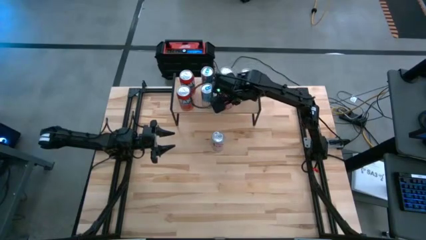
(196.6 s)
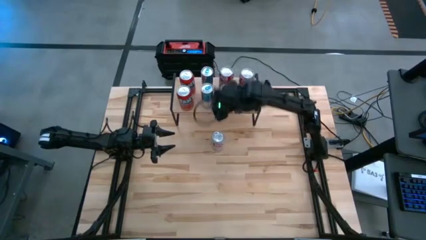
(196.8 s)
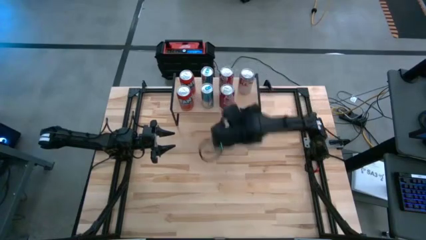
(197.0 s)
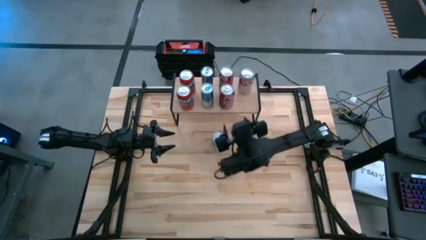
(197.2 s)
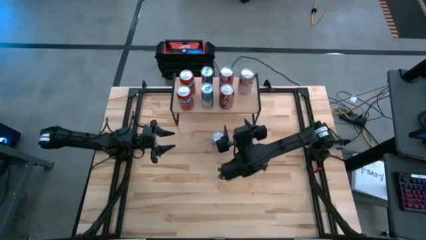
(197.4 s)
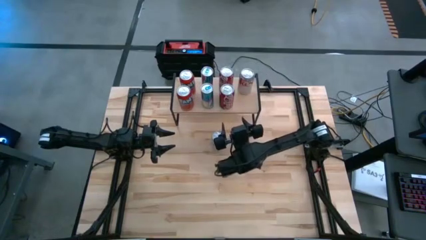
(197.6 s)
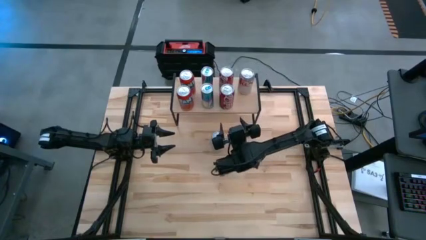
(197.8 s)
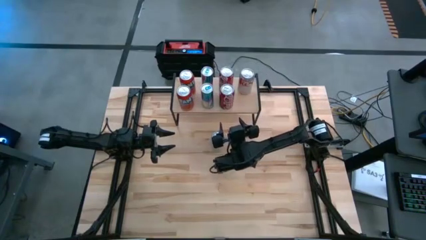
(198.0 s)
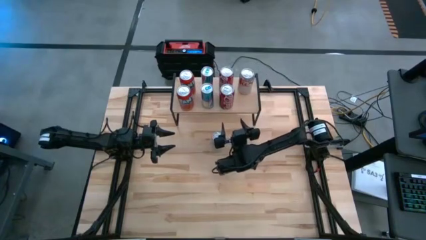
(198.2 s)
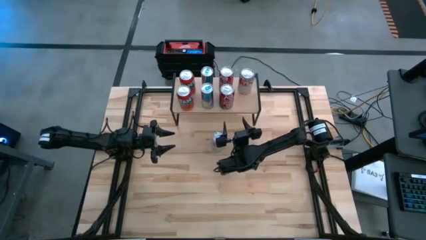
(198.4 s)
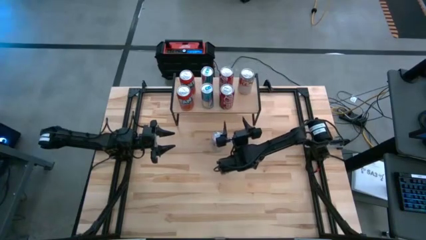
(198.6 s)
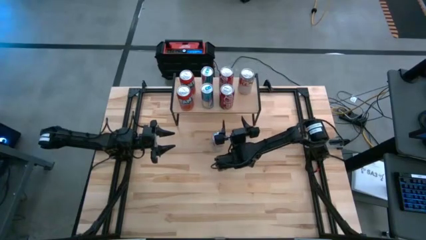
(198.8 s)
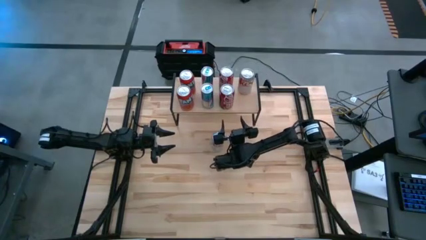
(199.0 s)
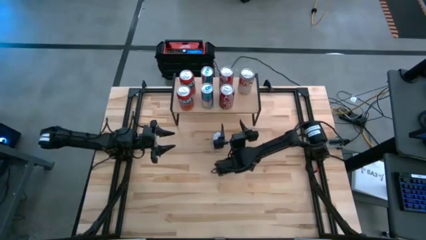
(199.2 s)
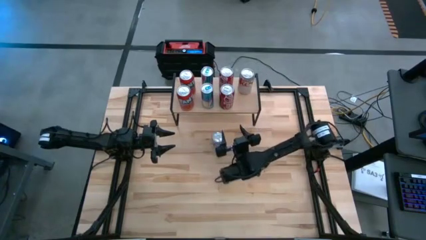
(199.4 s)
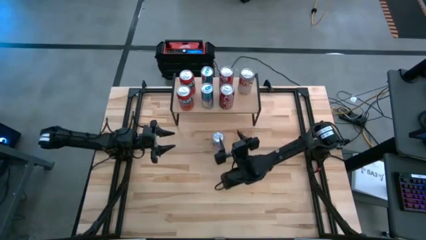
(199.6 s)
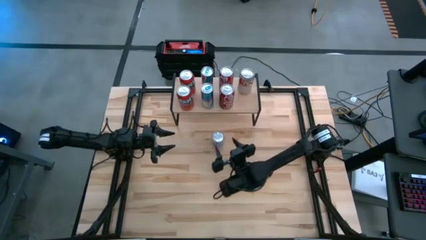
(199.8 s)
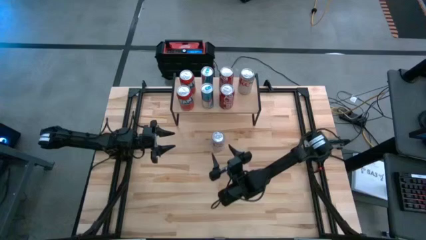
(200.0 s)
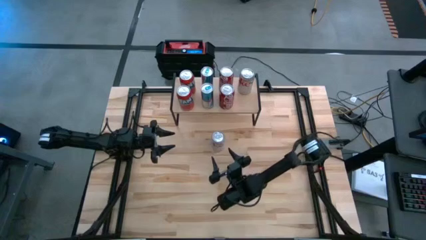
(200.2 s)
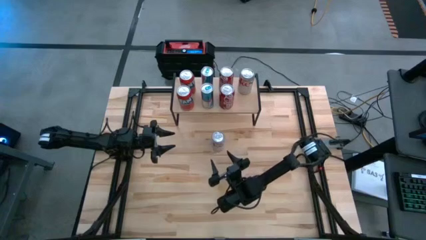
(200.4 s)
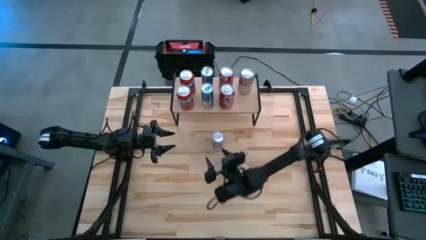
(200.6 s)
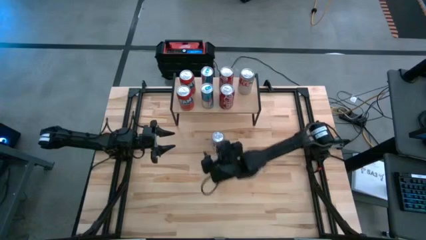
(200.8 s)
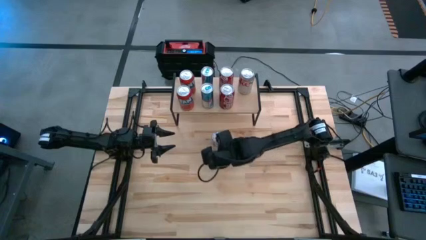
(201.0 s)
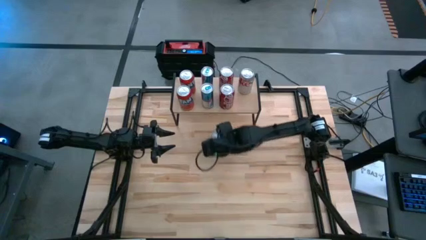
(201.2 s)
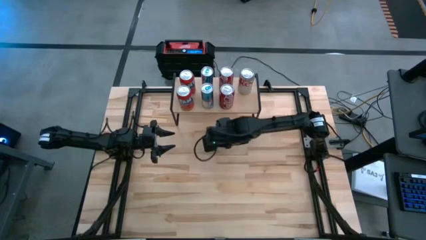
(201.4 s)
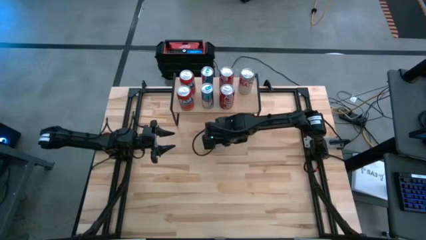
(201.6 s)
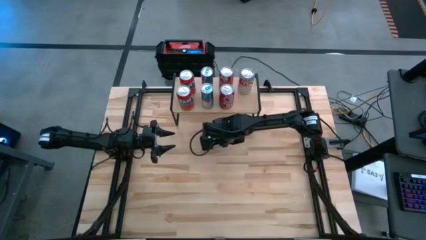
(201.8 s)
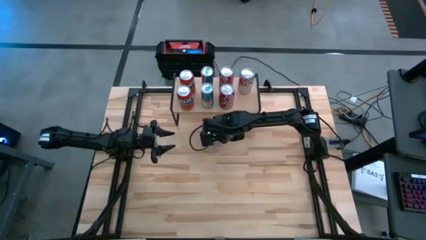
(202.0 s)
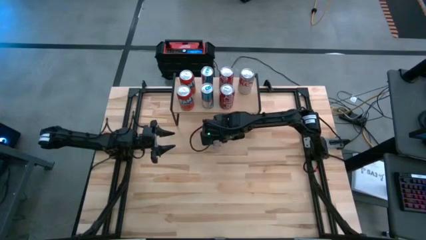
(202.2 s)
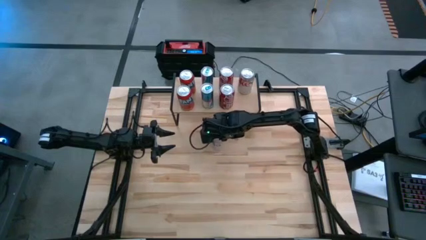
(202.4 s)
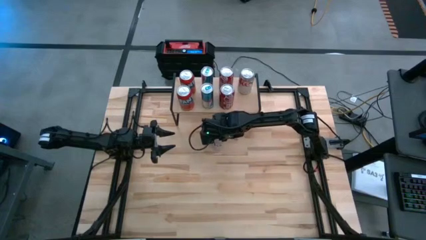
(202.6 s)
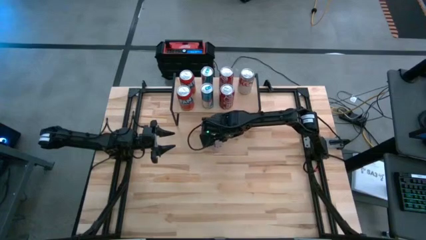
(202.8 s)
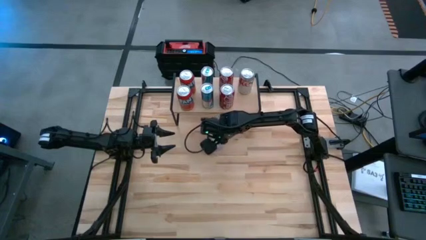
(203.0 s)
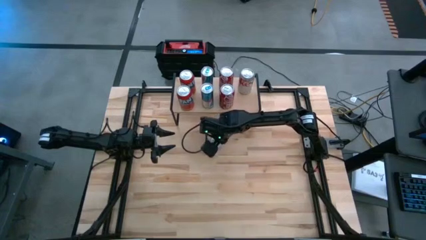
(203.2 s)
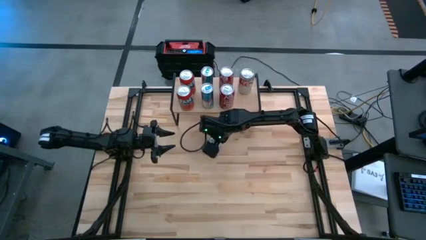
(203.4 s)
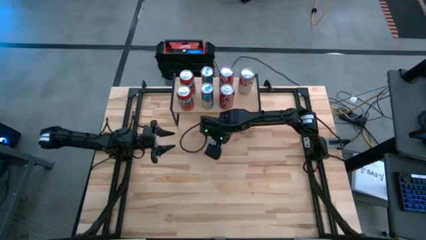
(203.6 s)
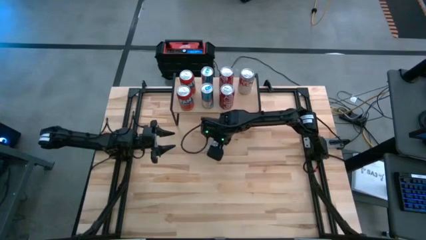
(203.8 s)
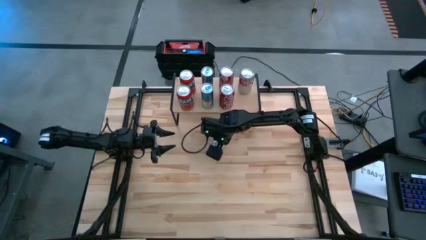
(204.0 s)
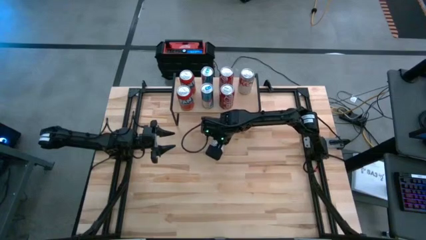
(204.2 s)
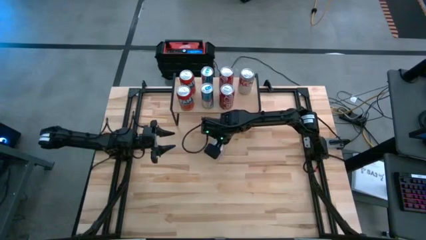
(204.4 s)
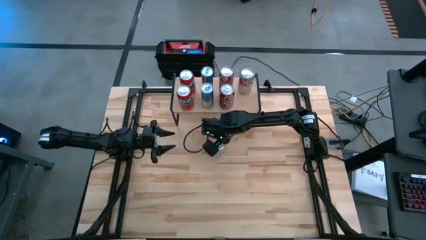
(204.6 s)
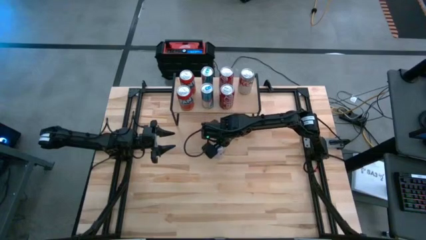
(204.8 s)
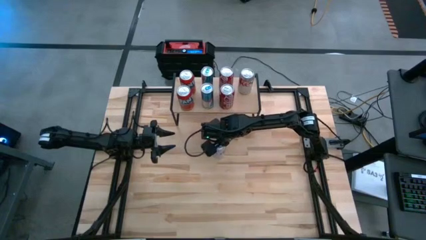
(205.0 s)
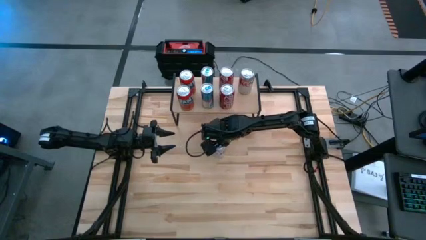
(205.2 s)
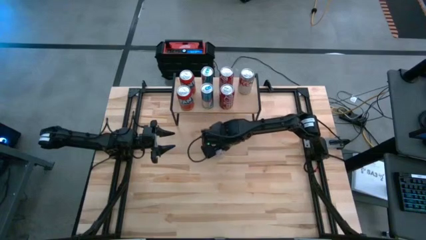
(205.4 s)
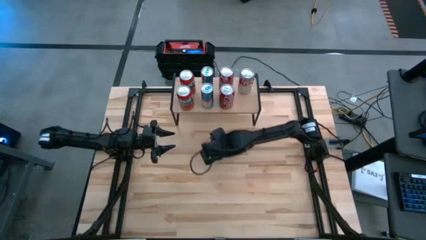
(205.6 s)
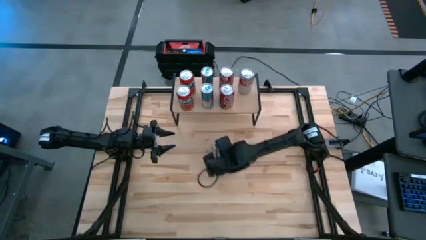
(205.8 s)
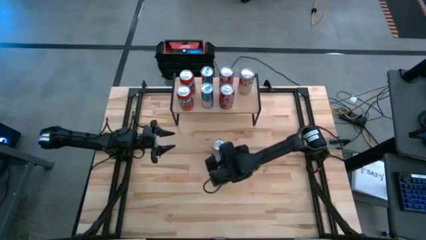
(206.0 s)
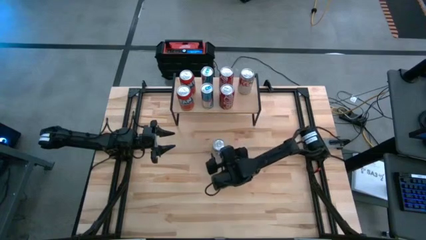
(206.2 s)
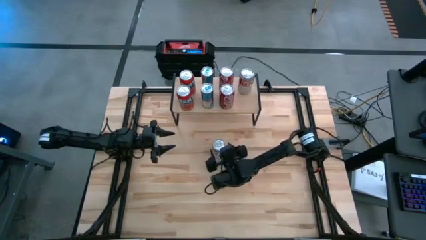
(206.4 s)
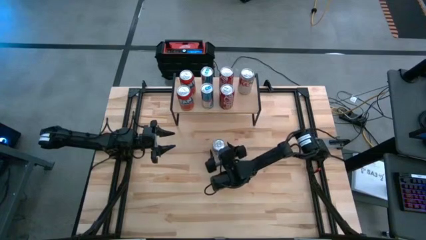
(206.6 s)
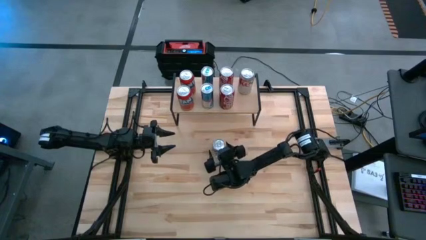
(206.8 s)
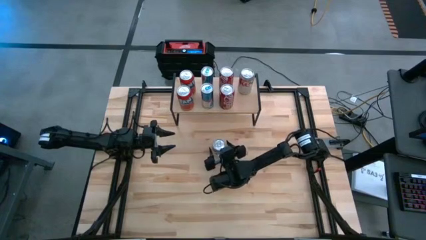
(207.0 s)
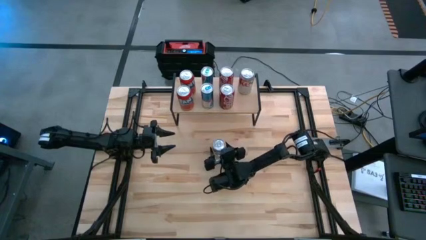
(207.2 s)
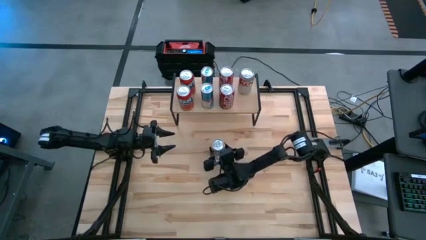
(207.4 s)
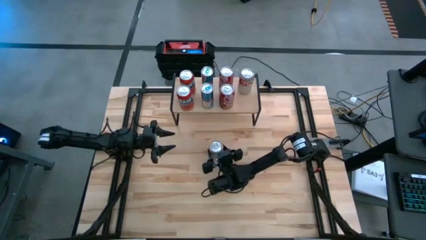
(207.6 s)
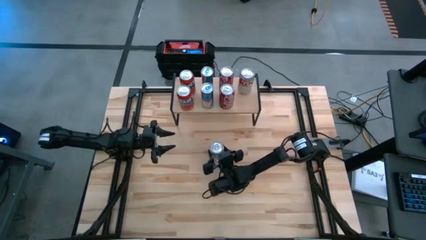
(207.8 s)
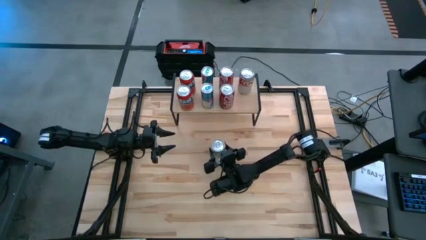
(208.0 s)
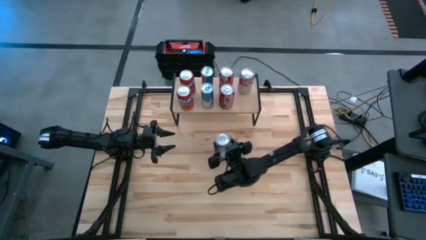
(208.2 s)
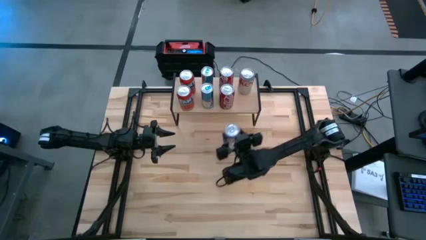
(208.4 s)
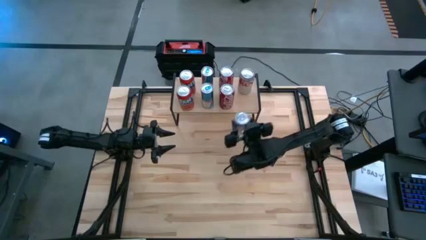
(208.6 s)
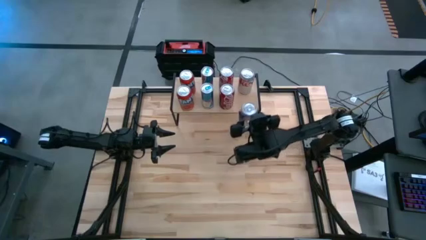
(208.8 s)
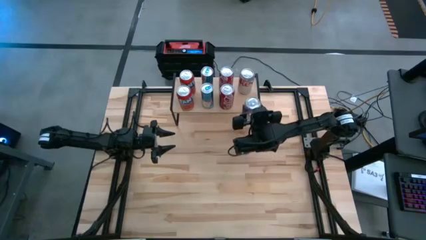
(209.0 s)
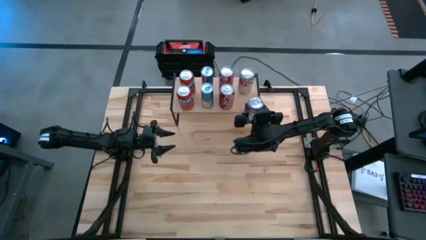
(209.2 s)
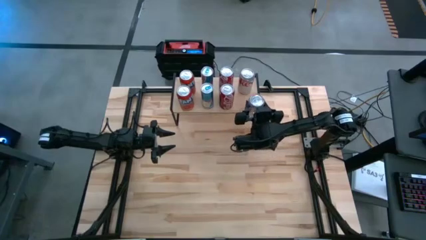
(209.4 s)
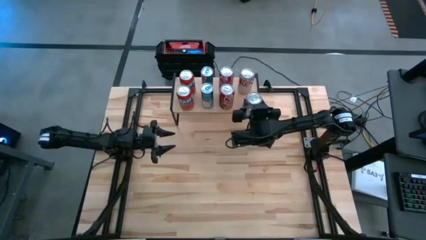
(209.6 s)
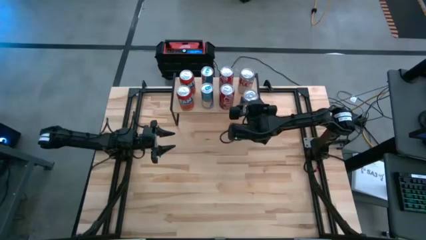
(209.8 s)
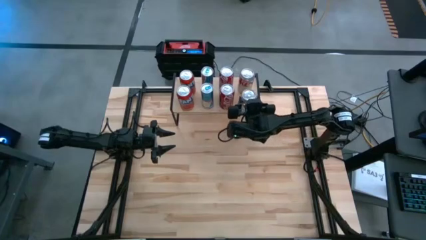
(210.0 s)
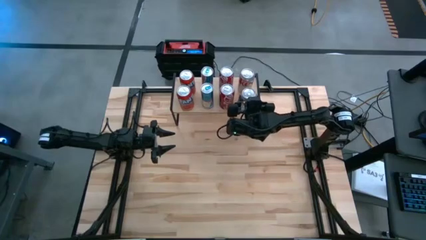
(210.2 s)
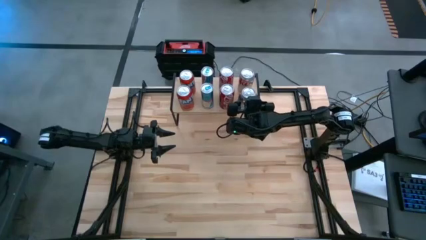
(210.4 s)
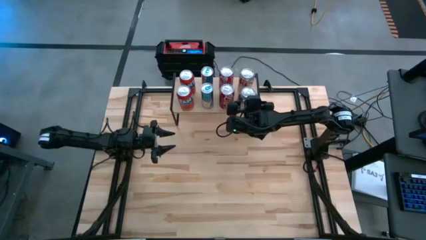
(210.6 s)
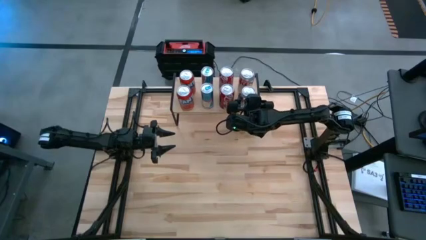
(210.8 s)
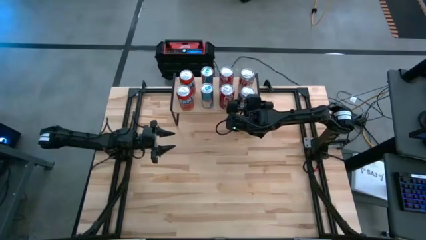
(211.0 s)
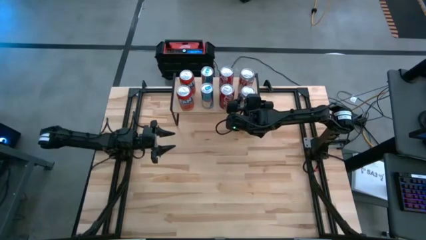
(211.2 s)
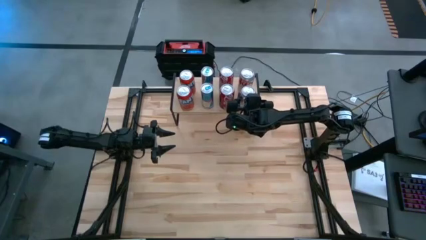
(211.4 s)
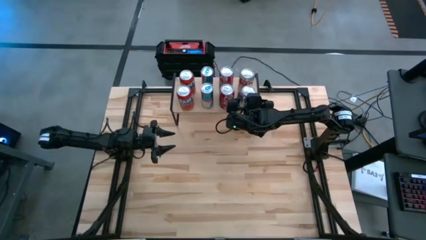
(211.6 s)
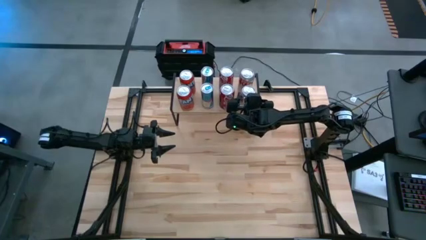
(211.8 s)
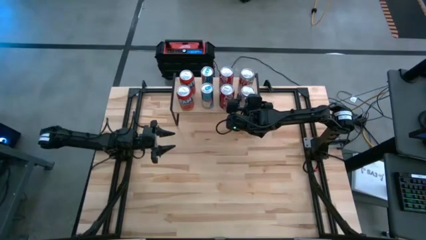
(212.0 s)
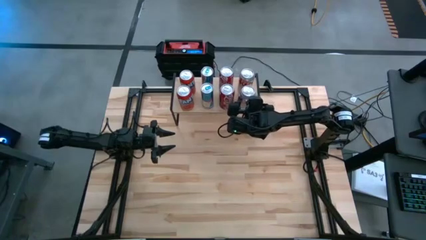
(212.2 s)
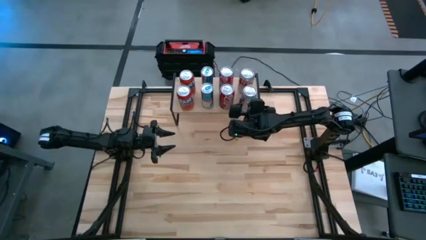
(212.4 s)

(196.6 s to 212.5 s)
Task: Place canned beverage on shelf
Put the red and silver soda can on the shelf aligned with the other red and silver soda can
